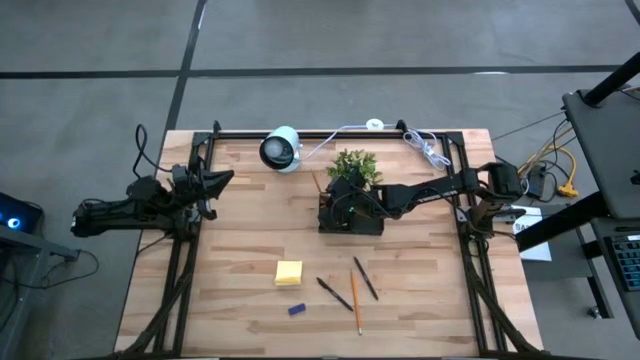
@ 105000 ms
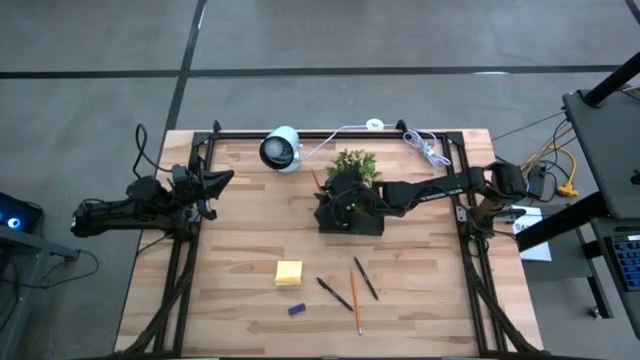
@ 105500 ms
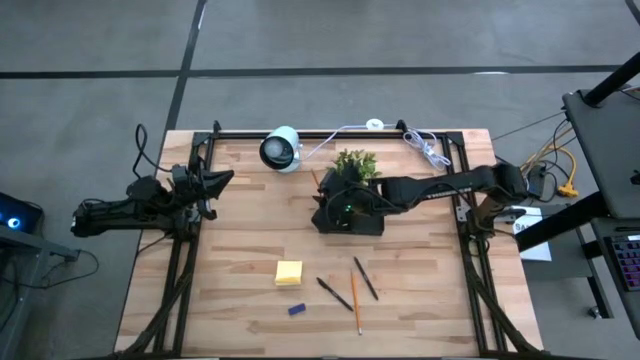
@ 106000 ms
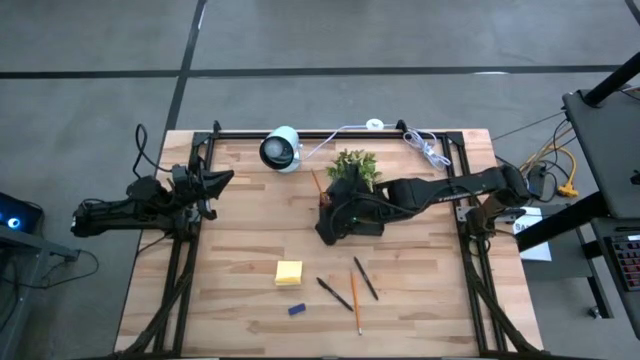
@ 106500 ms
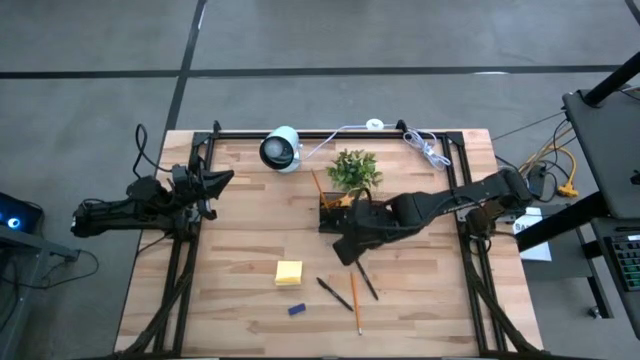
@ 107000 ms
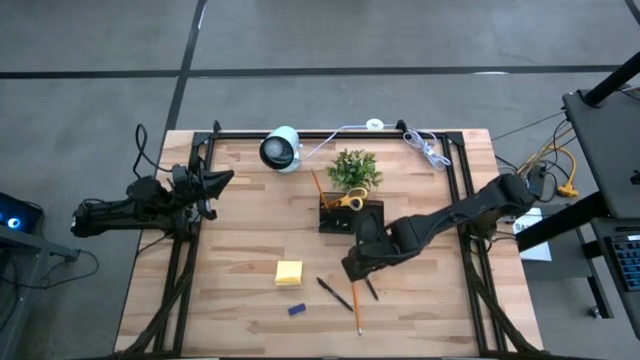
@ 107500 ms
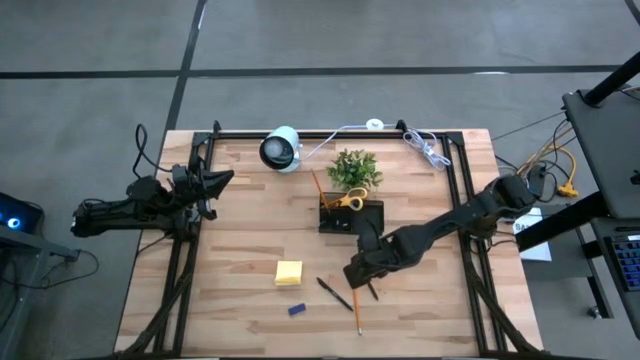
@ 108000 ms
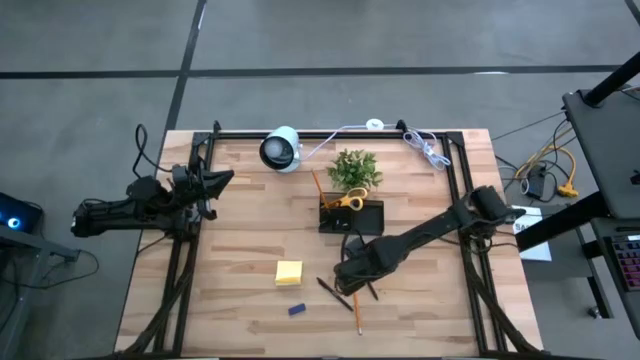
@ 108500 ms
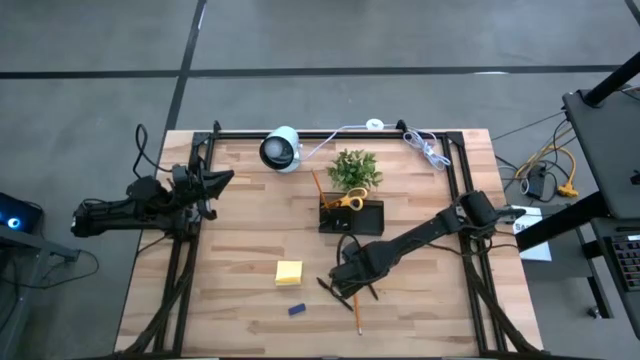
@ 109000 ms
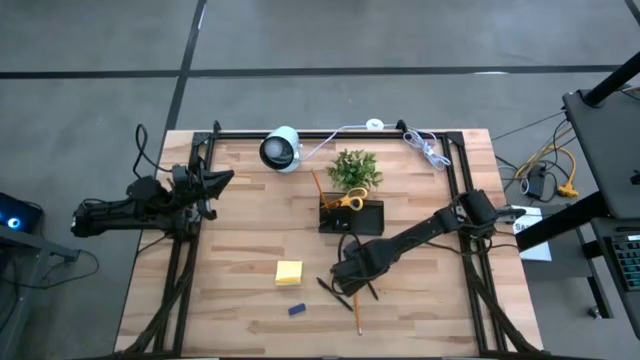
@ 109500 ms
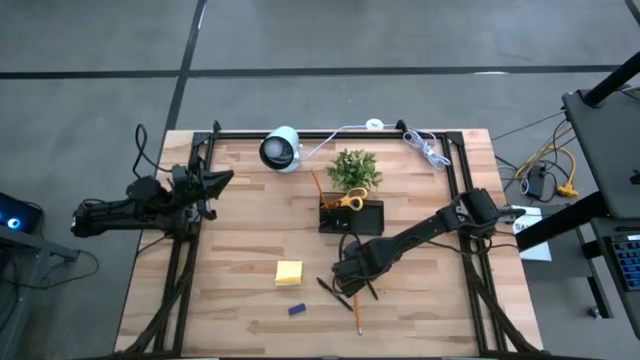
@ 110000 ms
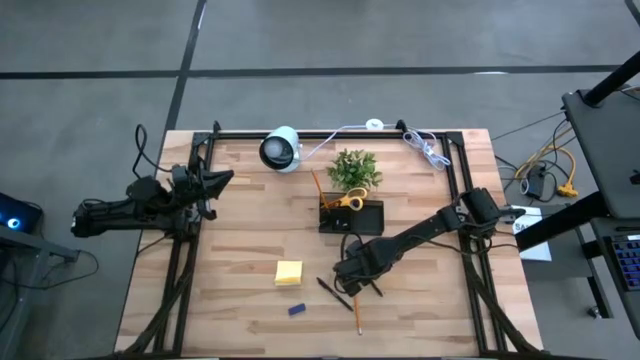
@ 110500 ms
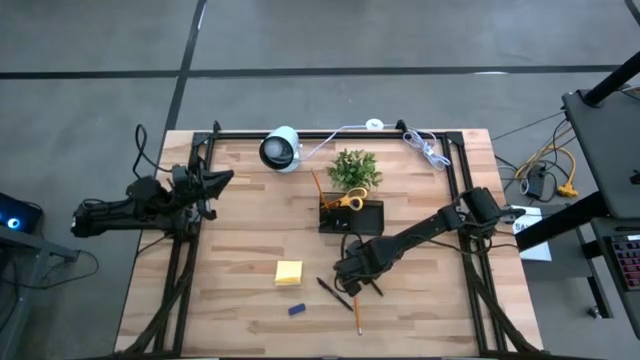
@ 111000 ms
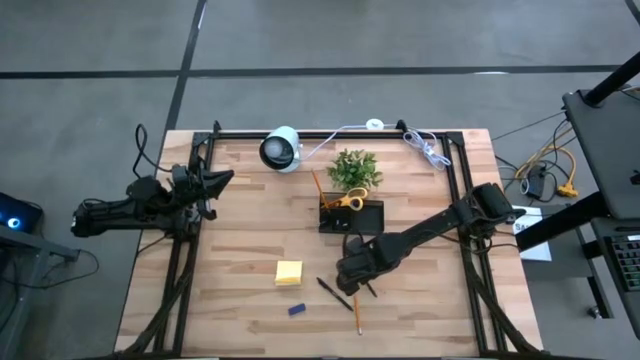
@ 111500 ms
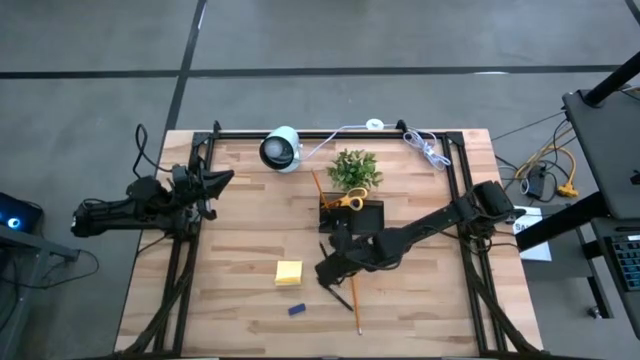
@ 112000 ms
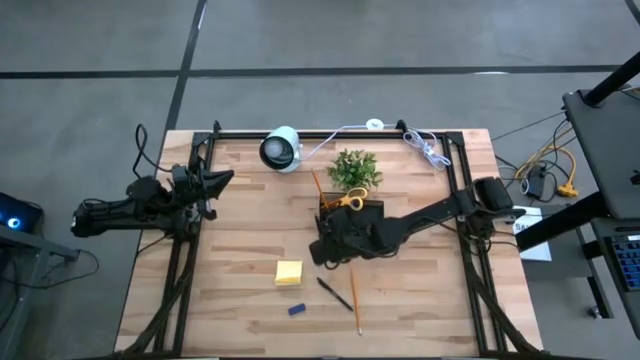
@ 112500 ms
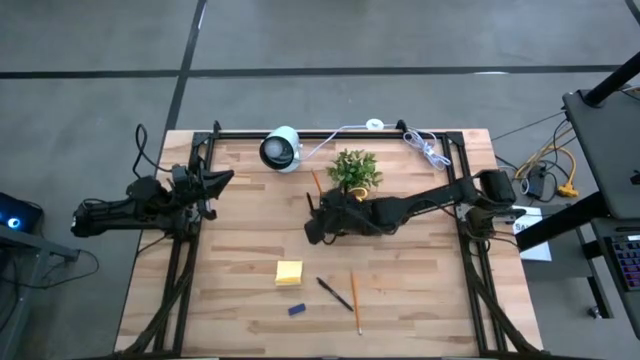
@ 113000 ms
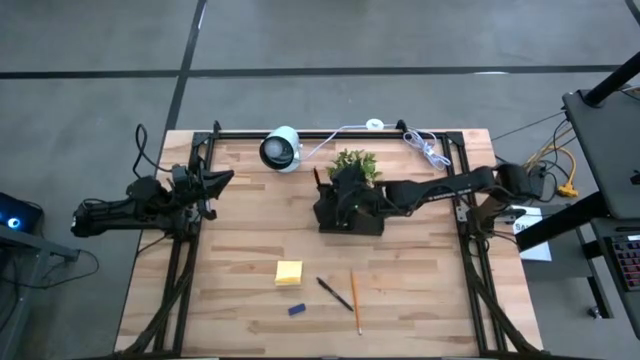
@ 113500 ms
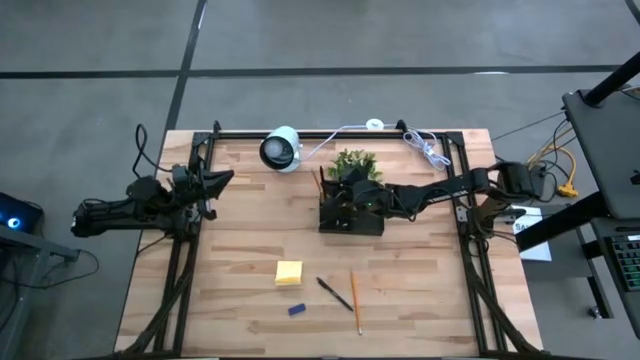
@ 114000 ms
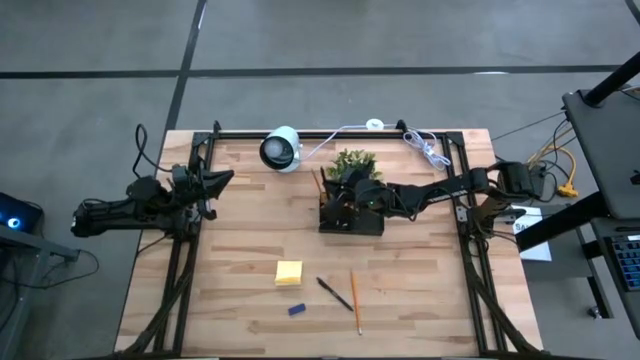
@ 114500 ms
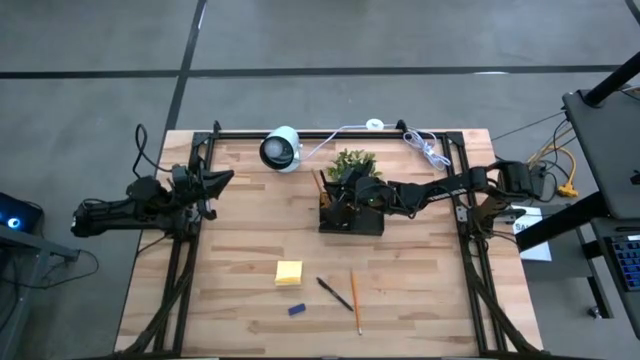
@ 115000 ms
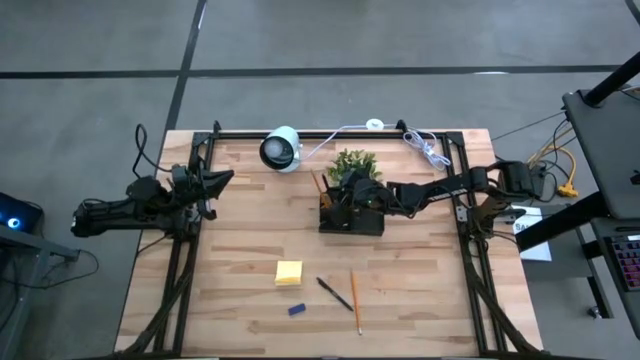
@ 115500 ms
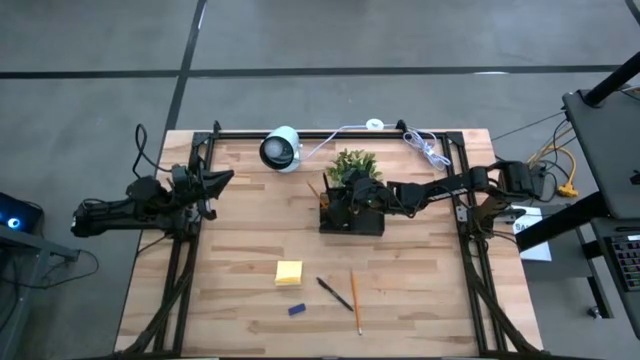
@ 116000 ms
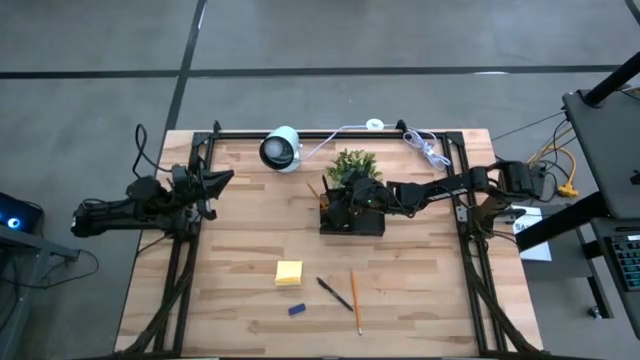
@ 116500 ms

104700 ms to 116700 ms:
Task: Pick and place office supplies into organizer
Put the right black pen into the black desk organizer

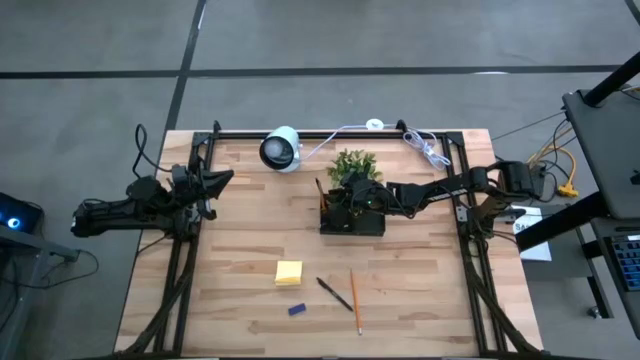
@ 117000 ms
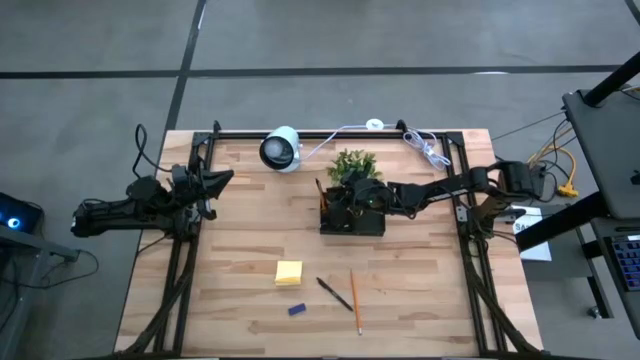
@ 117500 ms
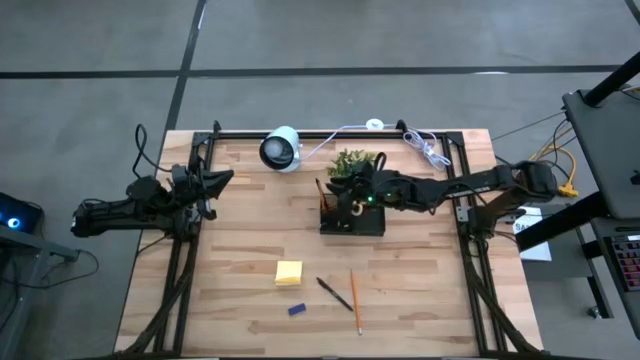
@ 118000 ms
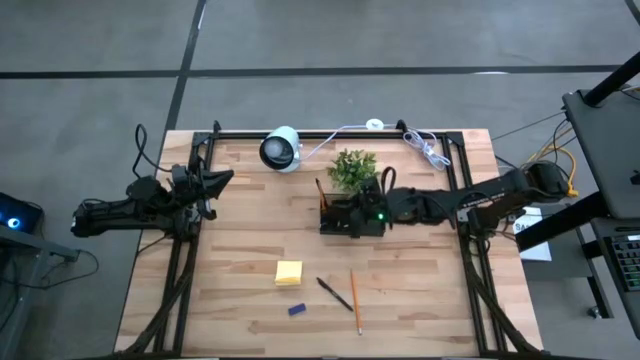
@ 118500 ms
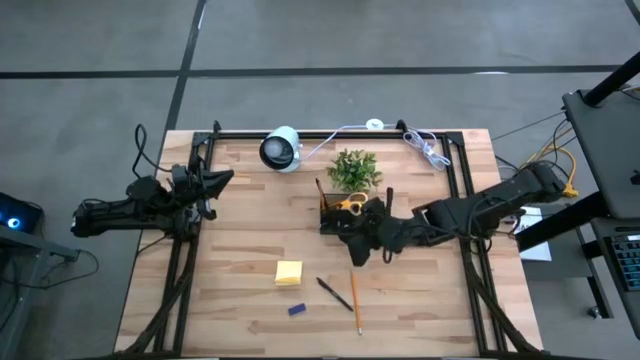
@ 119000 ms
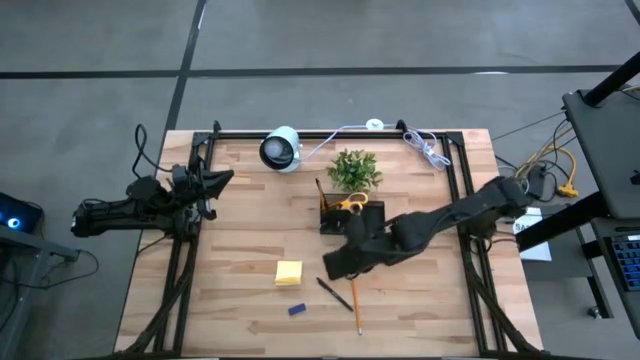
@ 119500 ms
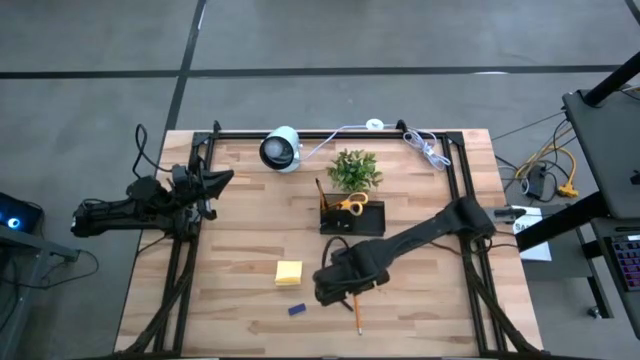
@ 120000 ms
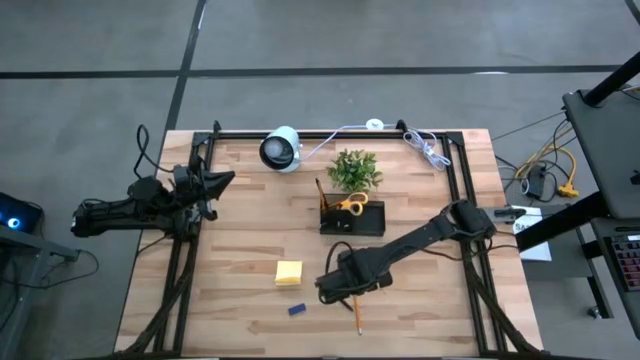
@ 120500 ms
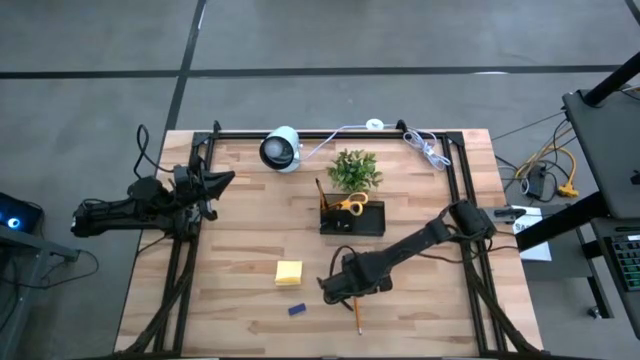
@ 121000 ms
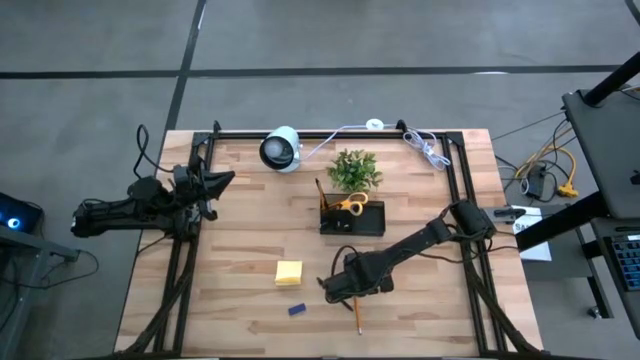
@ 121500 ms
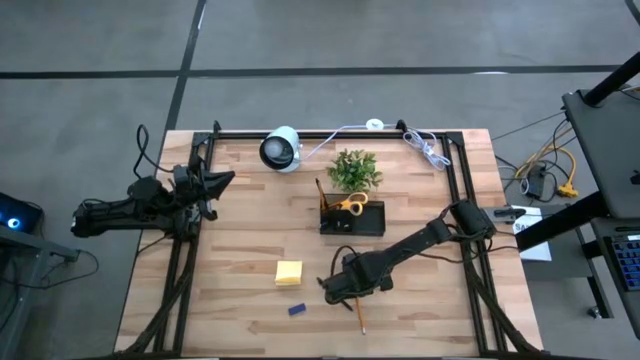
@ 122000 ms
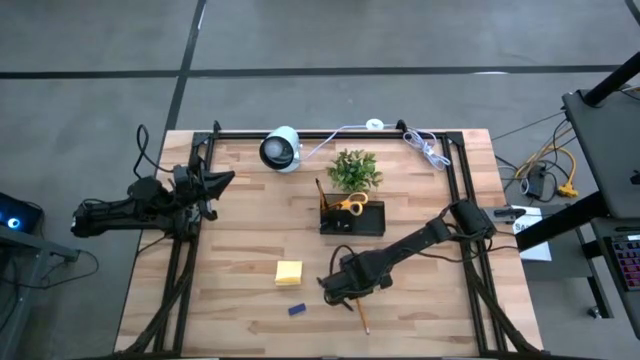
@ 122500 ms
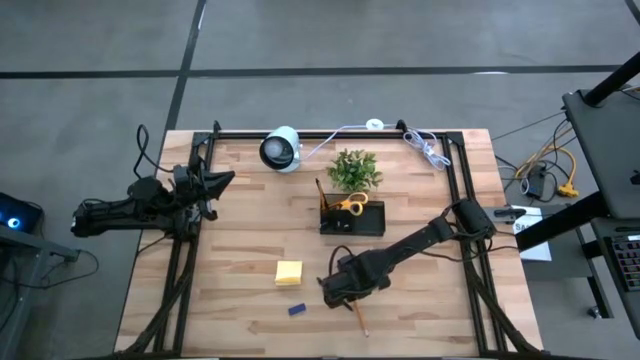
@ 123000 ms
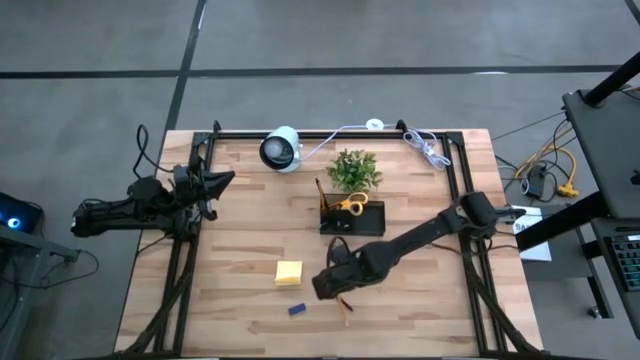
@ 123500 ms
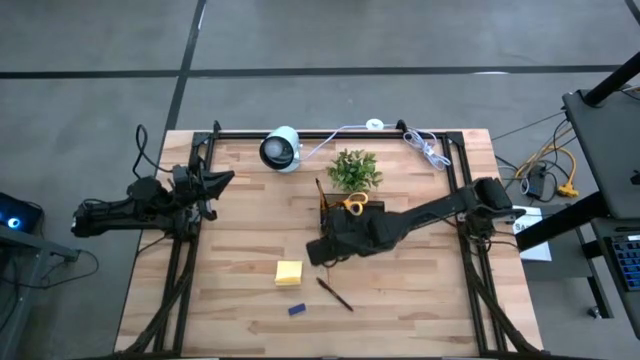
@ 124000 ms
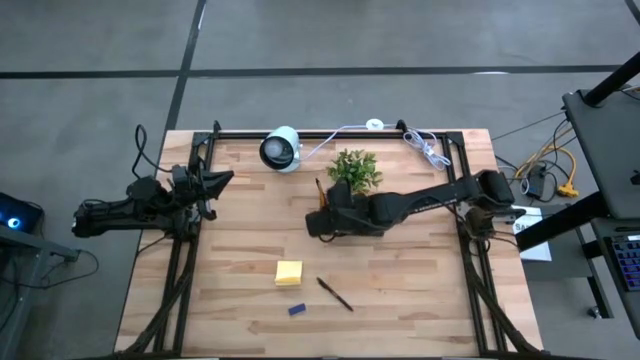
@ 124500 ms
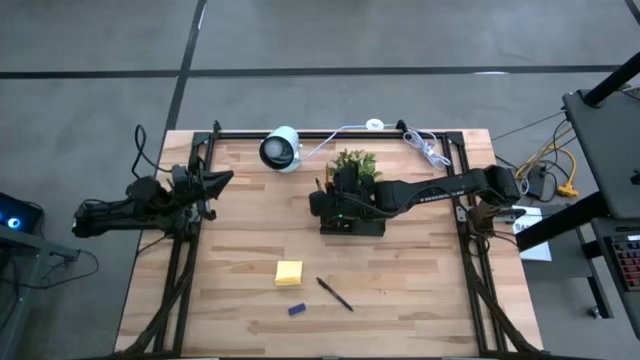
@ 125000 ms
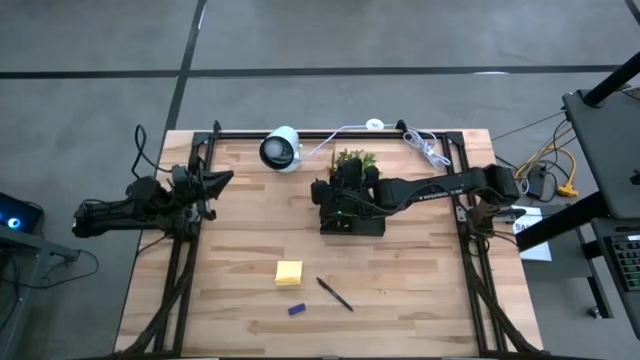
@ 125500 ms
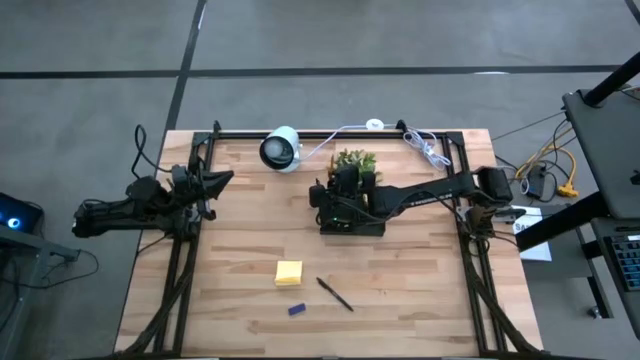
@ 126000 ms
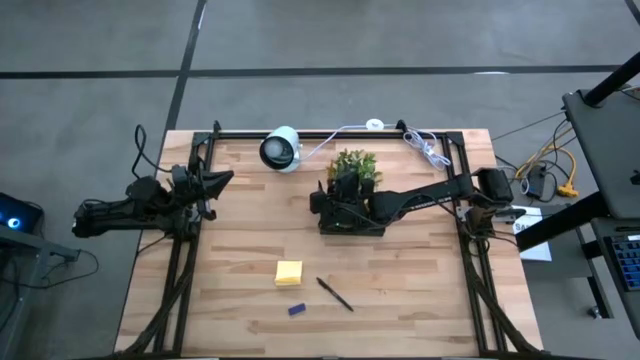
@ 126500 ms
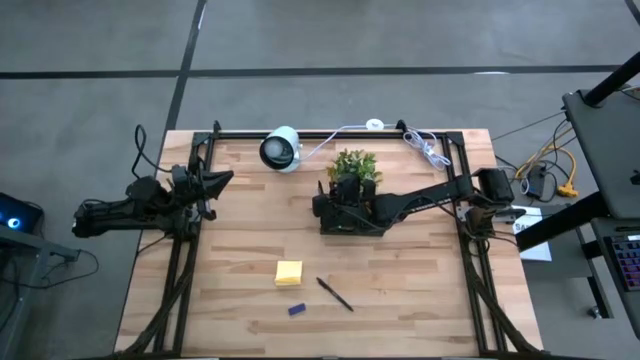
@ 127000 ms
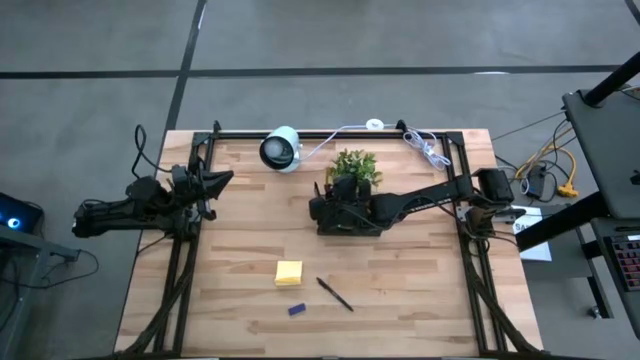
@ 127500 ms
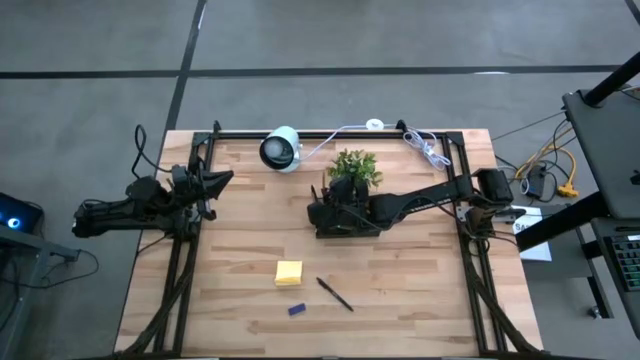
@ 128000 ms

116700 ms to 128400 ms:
Put the orange pencil into the black desk organizer
